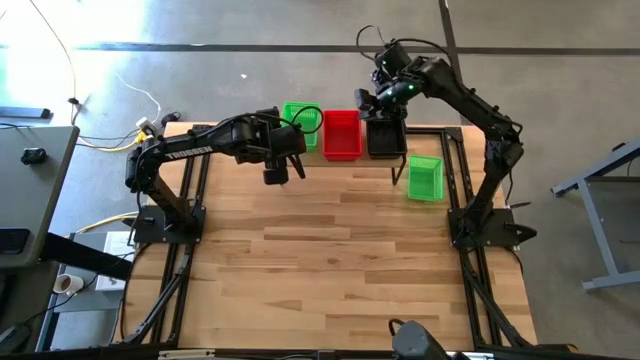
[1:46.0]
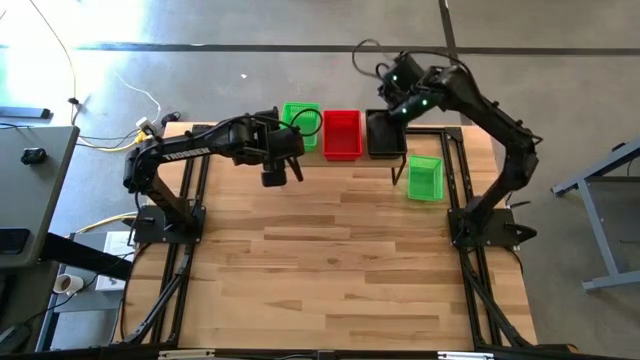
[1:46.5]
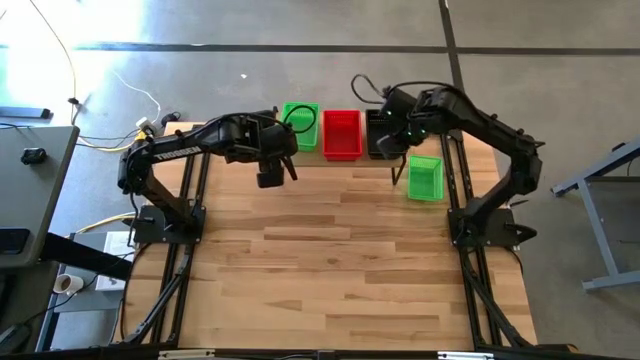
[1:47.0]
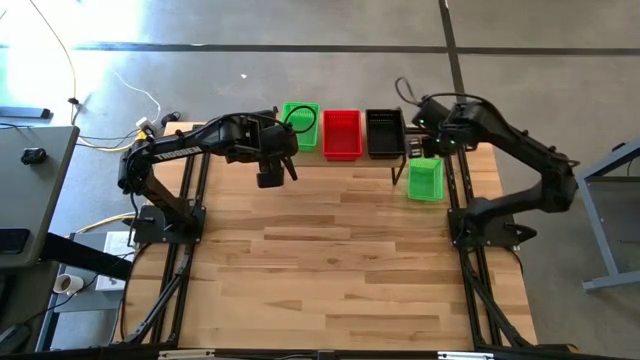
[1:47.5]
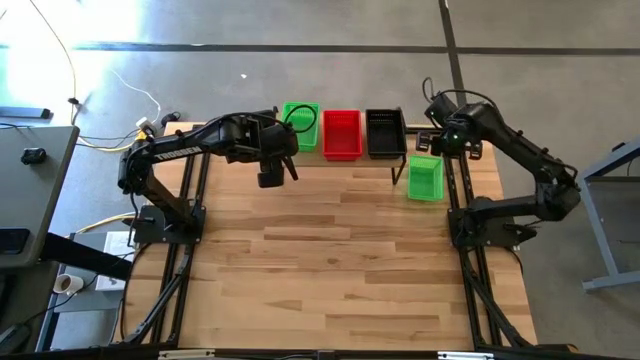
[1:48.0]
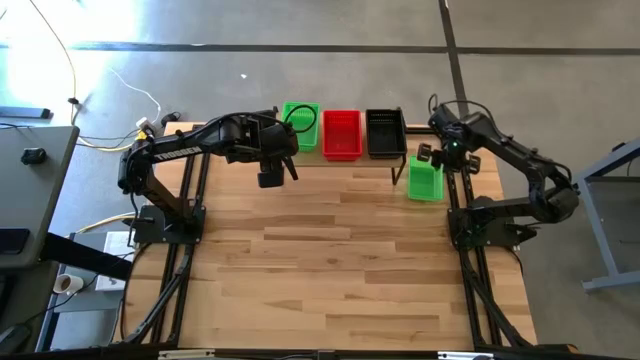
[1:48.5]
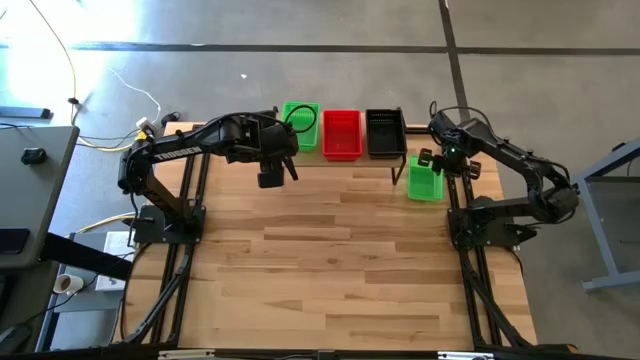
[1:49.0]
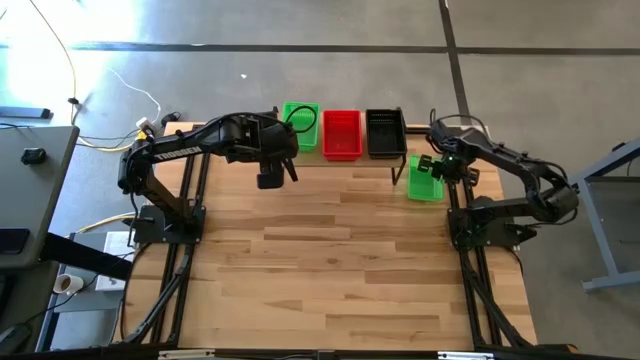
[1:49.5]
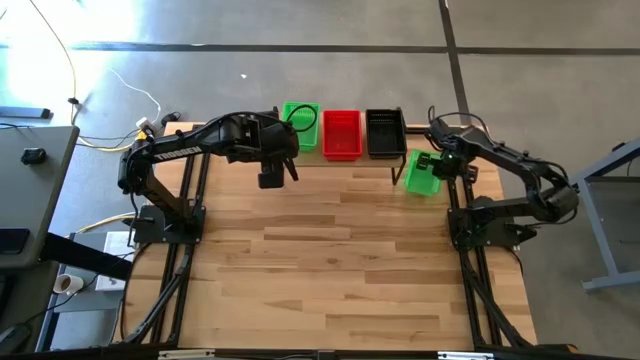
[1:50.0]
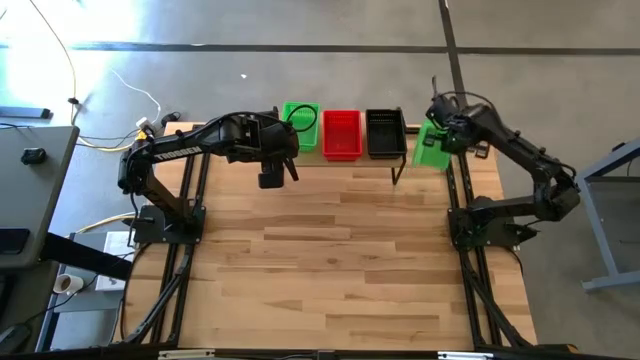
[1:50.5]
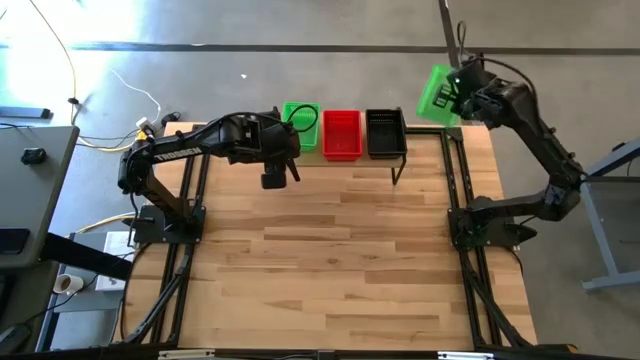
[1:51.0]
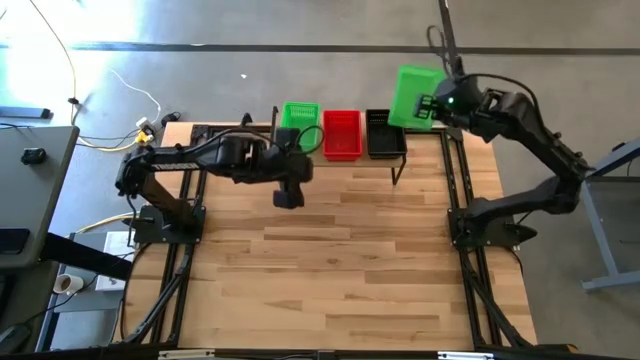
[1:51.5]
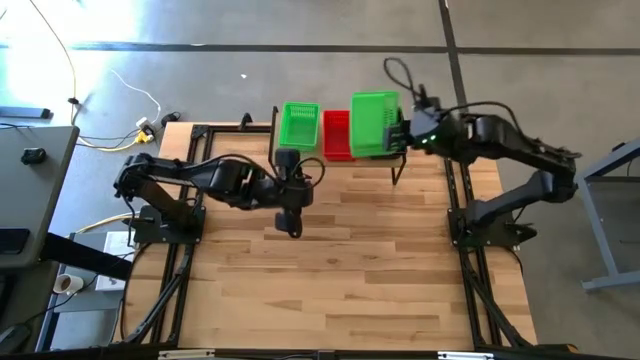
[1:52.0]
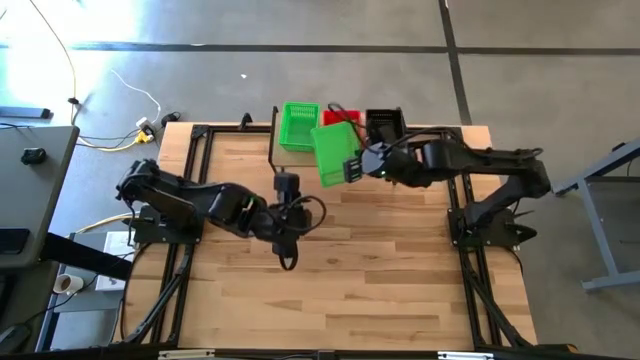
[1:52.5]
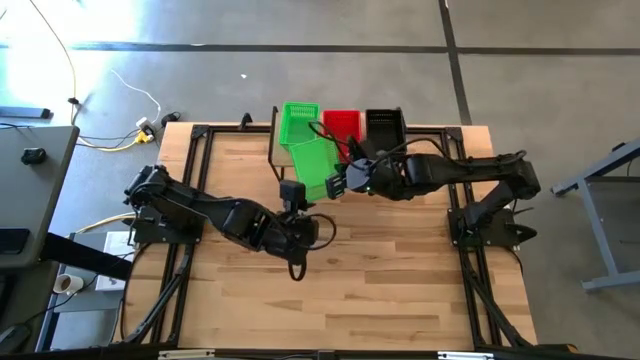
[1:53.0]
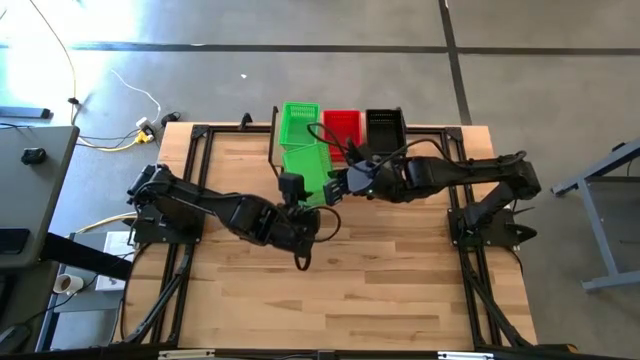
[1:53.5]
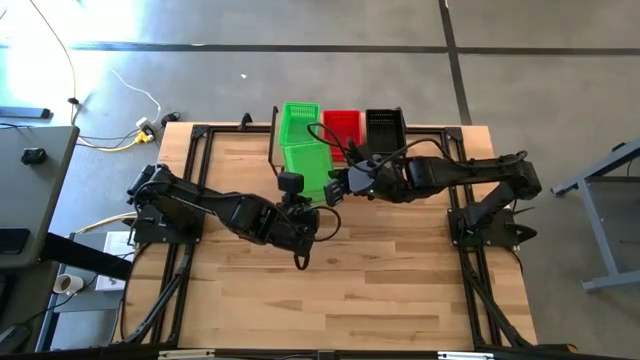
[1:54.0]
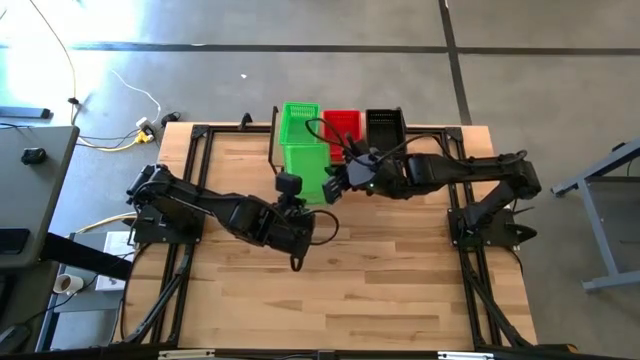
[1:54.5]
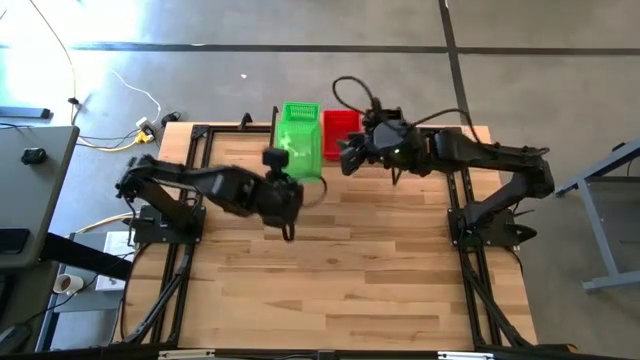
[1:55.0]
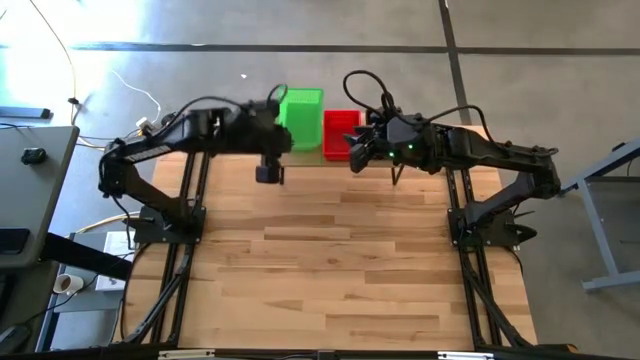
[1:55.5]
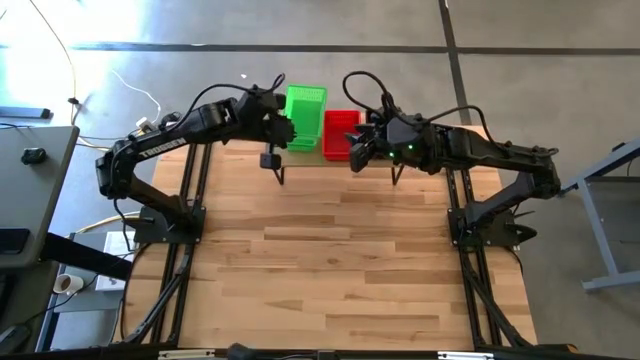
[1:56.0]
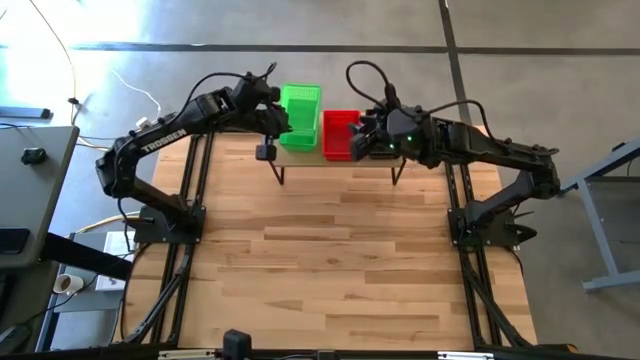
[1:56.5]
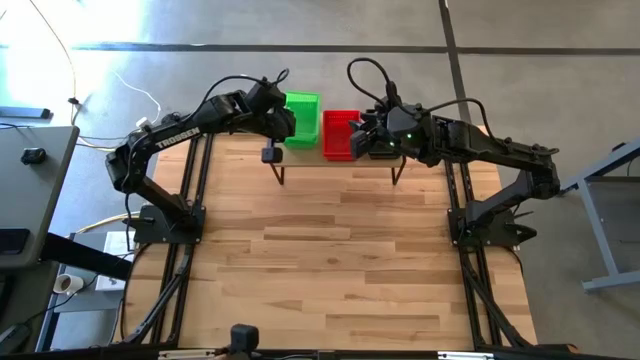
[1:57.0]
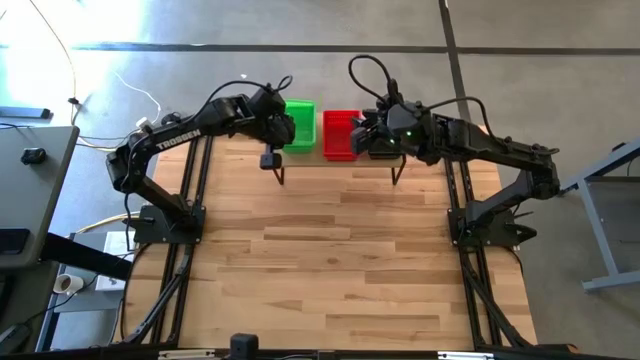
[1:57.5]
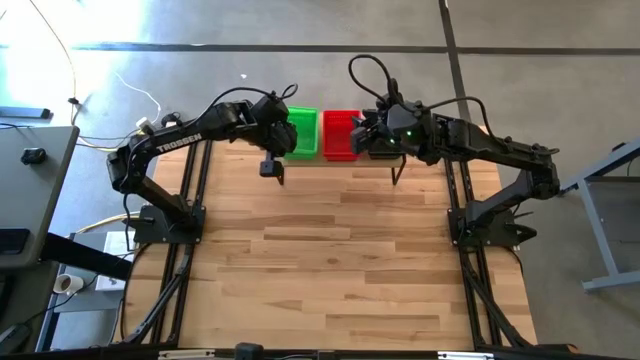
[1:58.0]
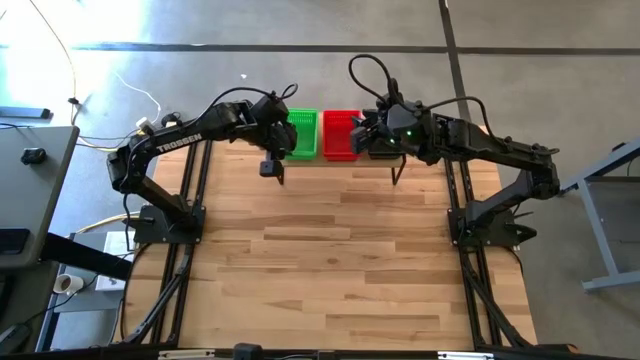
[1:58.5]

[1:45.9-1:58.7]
Task: Stack baskets on shelf by color
Stack the green bin on top of the stacked green bins on the shelf

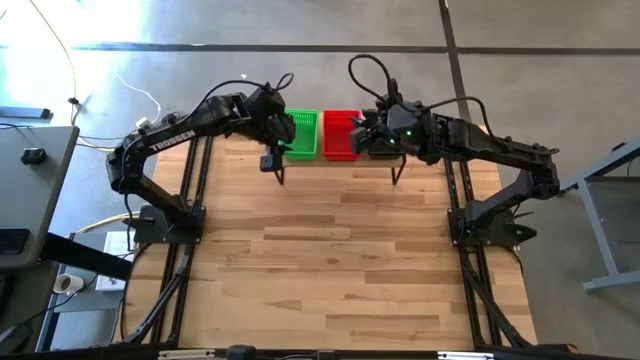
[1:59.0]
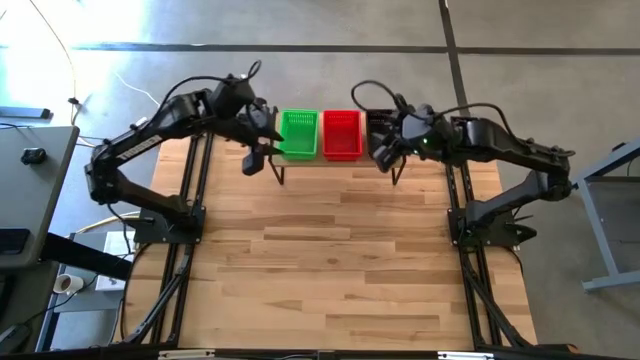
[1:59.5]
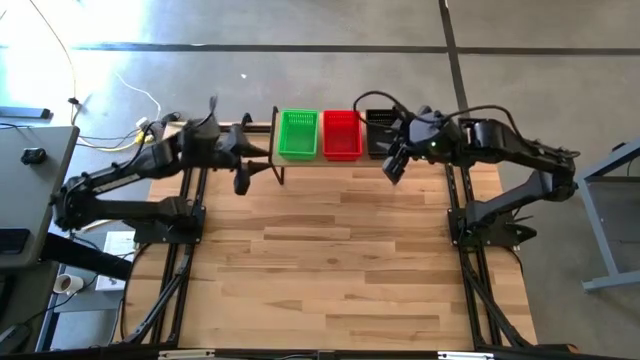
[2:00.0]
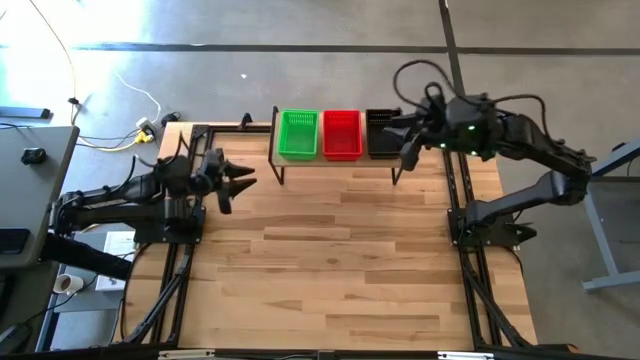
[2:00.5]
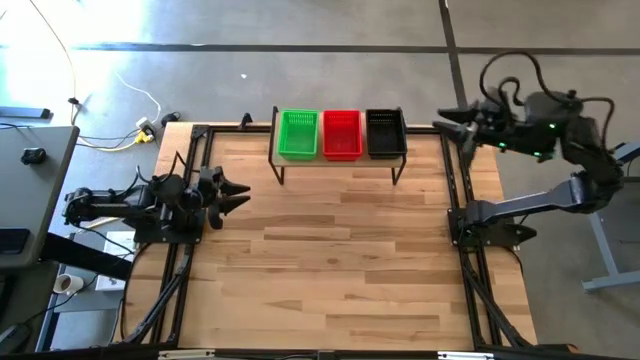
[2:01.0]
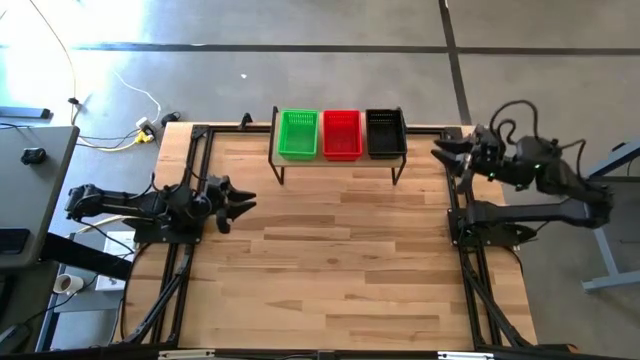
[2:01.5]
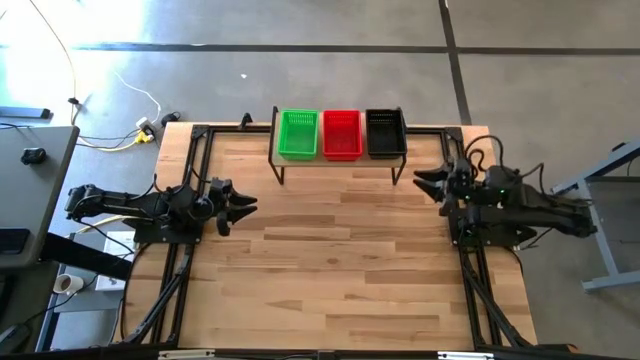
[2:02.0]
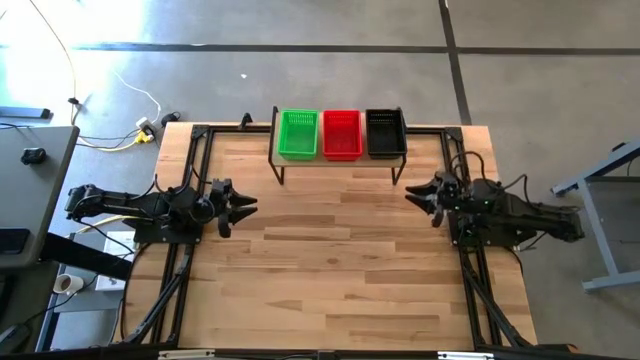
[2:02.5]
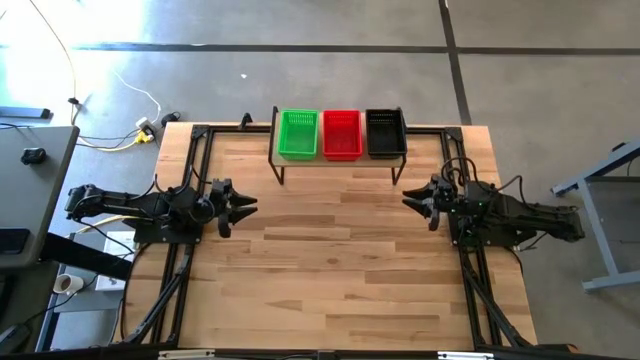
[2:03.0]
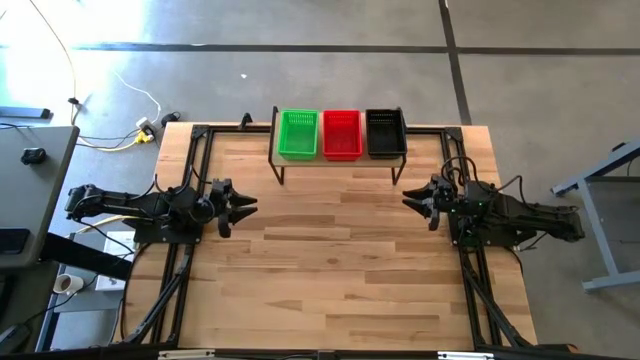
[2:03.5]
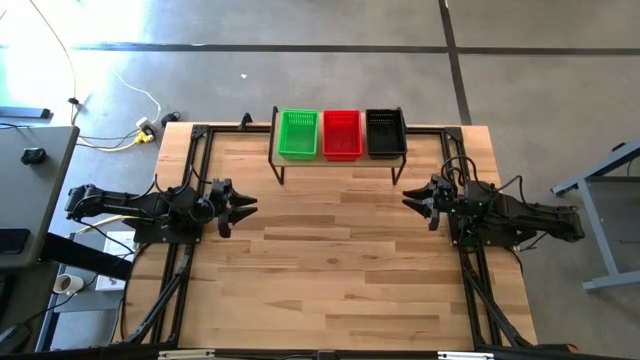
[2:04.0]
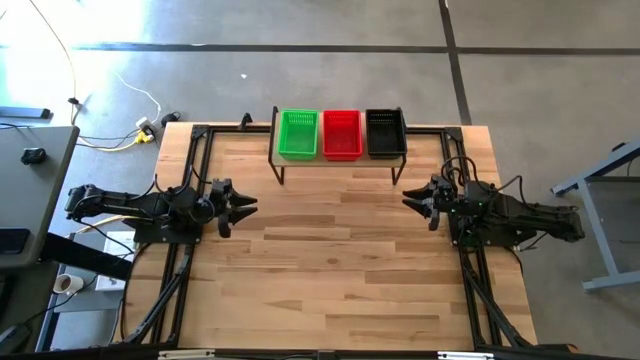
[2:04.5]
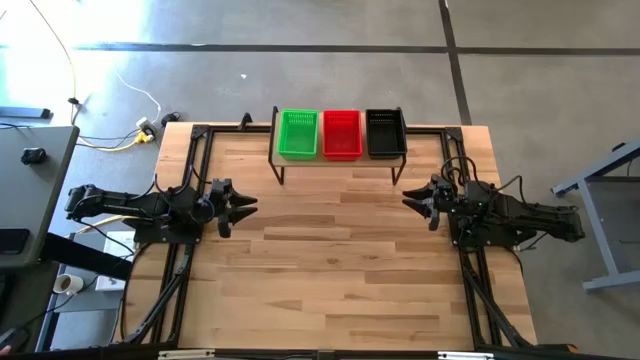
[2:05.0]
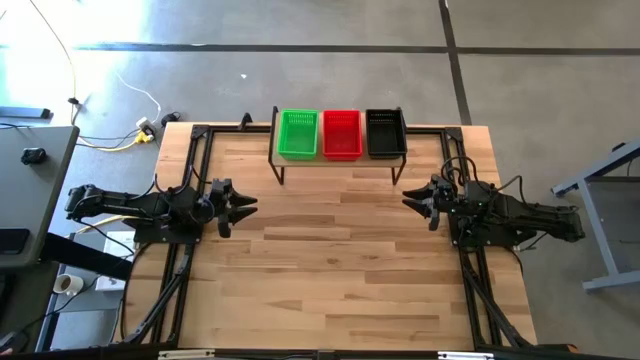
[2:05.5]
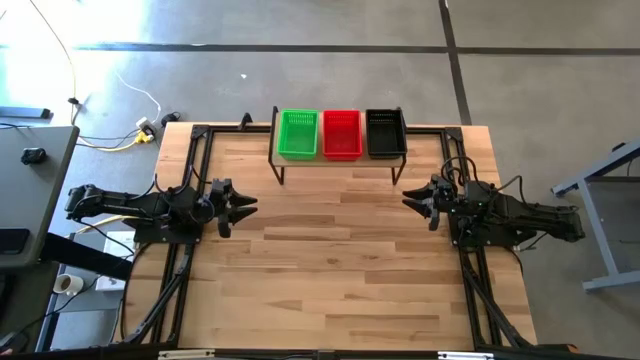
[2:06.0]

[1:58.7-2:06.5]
Return to Home Position

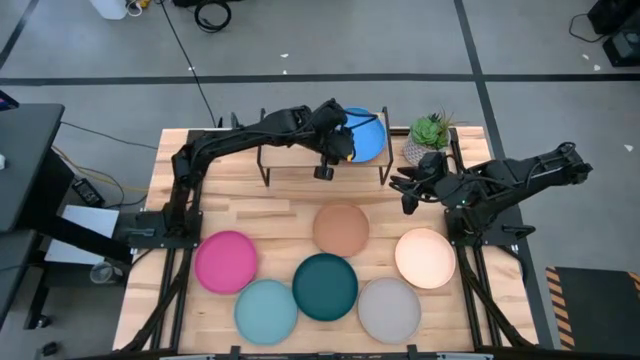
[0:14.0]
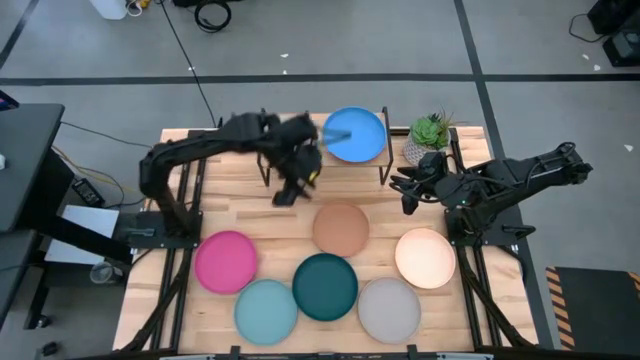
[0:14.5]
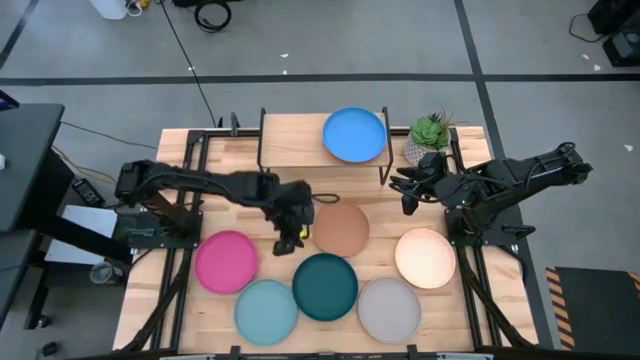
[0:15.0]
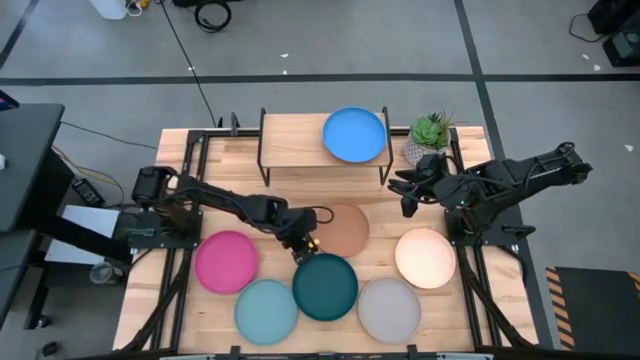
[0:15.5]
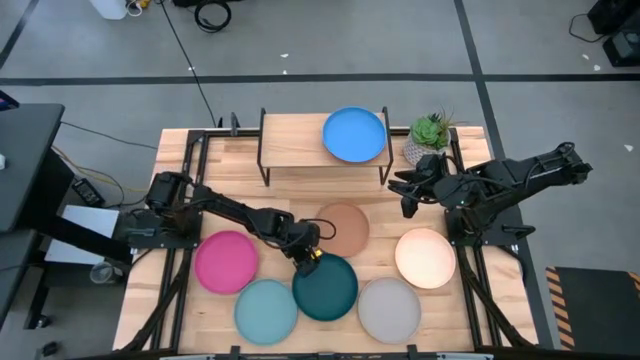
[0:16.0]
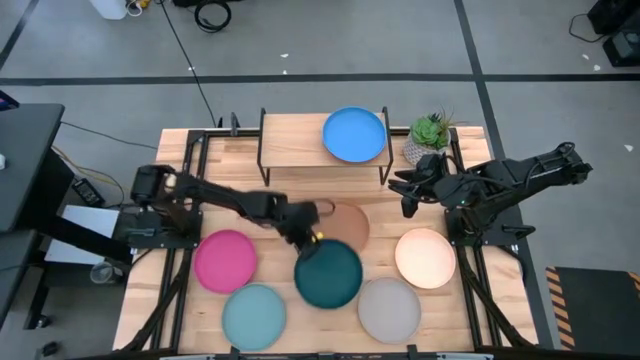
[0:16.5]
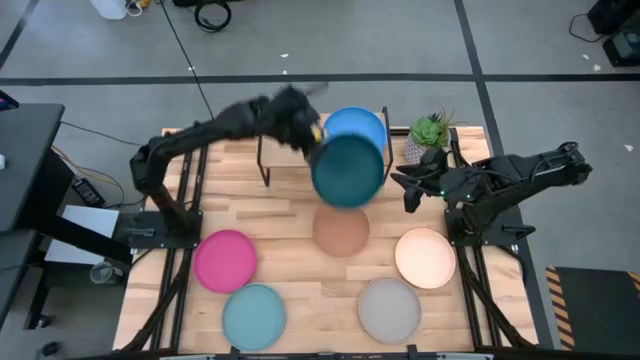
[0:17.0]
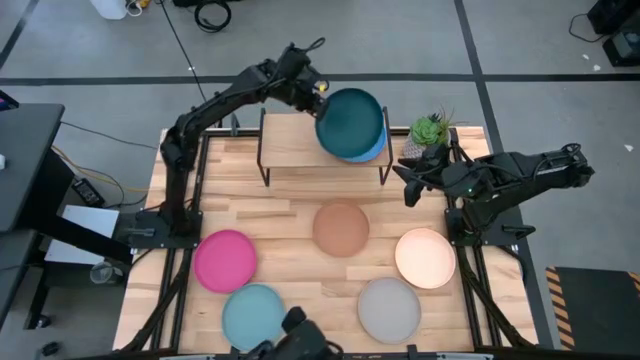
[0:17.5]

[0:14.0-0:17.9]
Task: Place and stack plates onto a shelf
Stack the dark green plate on top of the blue plate on the shelf
